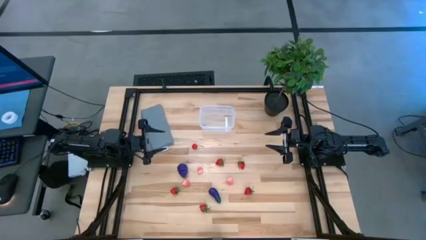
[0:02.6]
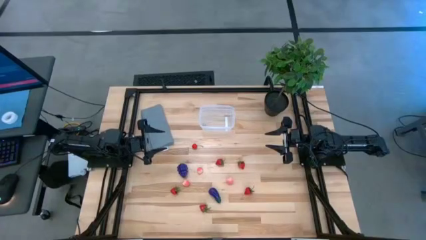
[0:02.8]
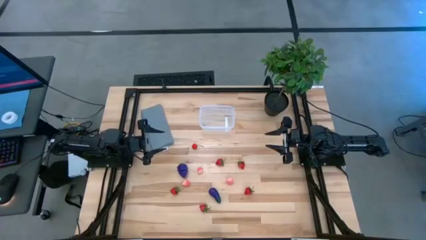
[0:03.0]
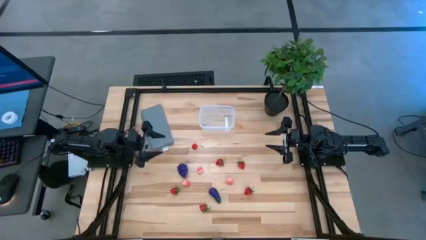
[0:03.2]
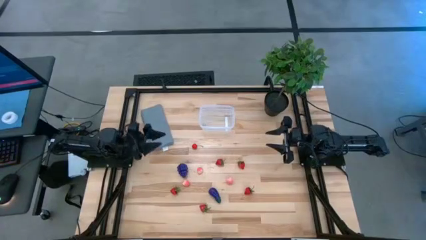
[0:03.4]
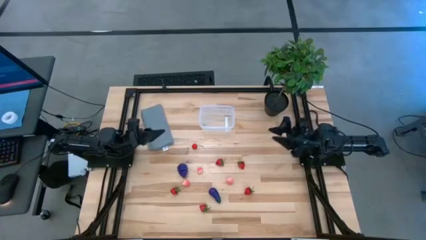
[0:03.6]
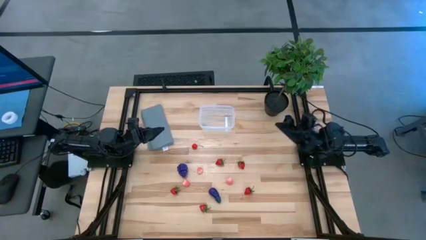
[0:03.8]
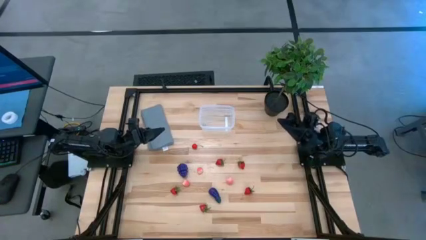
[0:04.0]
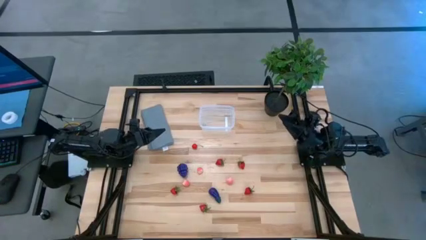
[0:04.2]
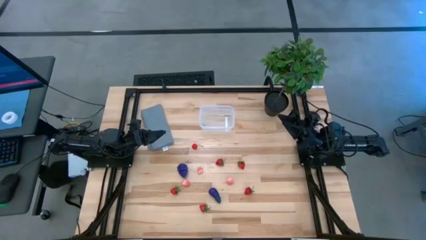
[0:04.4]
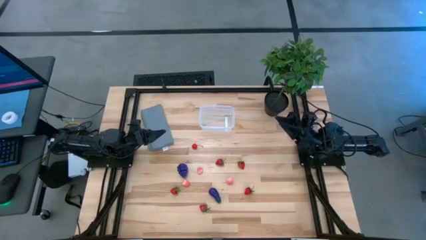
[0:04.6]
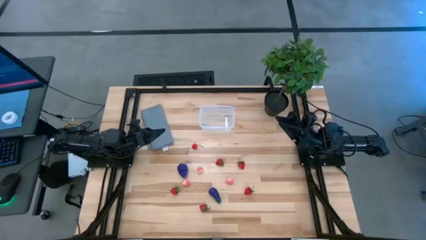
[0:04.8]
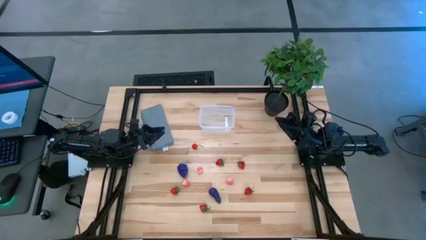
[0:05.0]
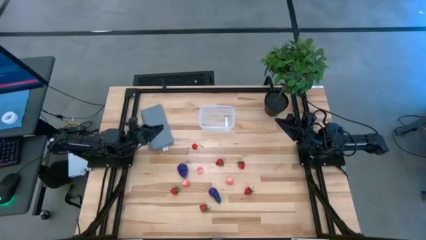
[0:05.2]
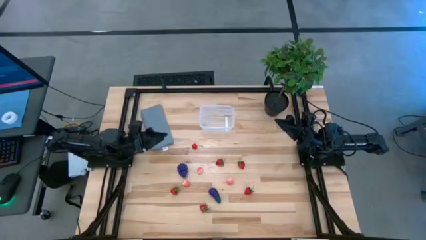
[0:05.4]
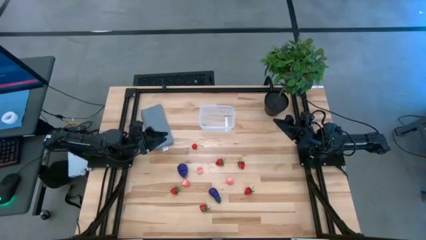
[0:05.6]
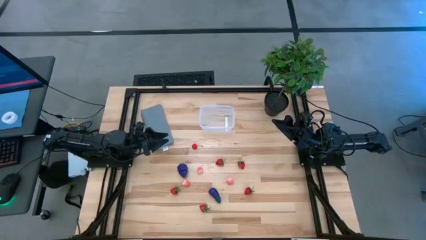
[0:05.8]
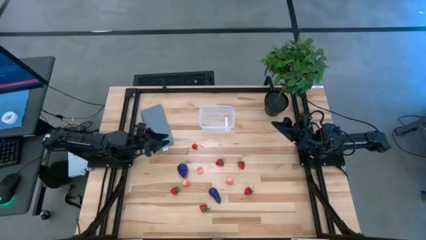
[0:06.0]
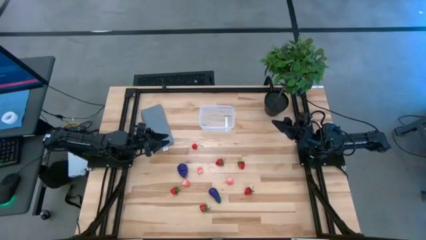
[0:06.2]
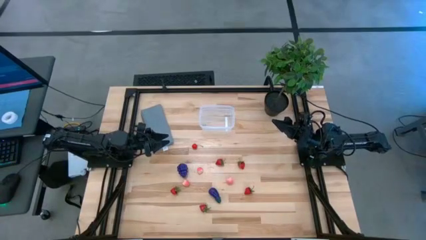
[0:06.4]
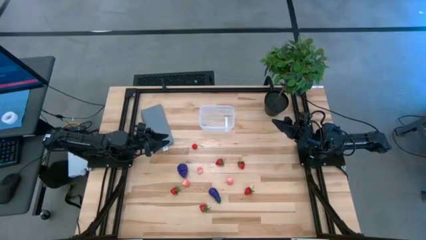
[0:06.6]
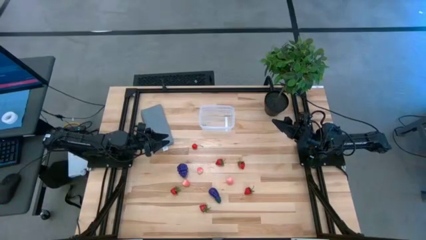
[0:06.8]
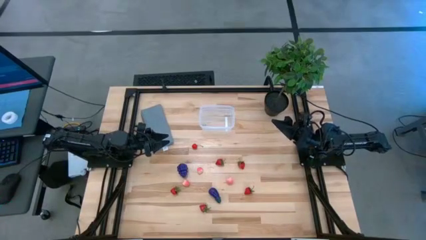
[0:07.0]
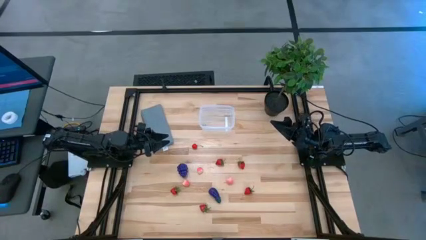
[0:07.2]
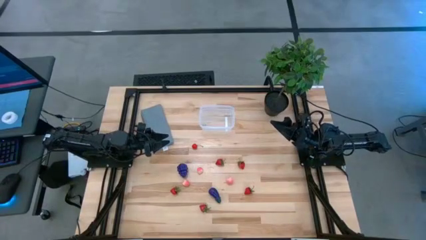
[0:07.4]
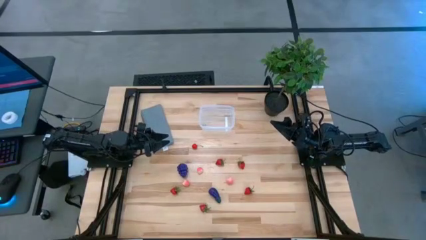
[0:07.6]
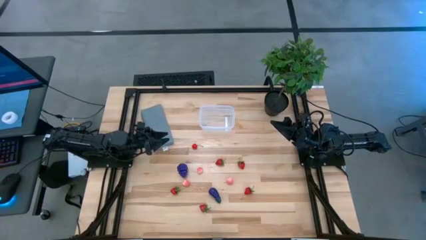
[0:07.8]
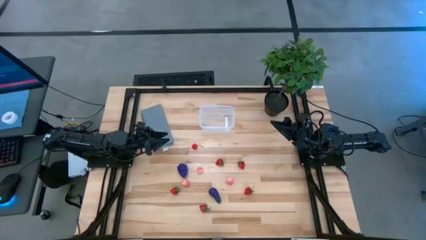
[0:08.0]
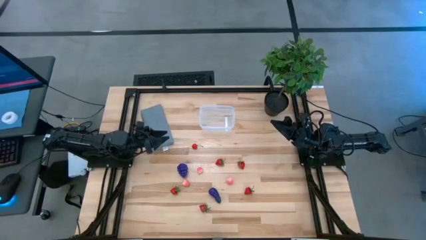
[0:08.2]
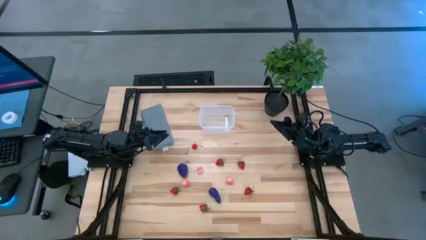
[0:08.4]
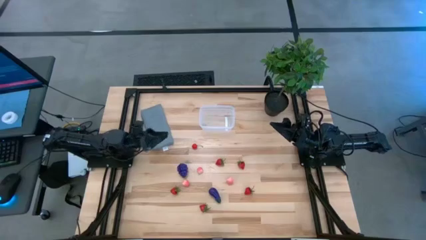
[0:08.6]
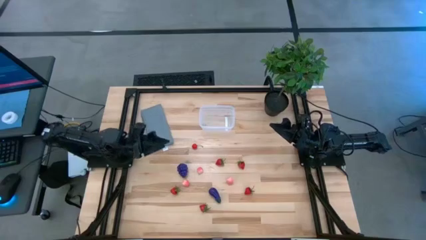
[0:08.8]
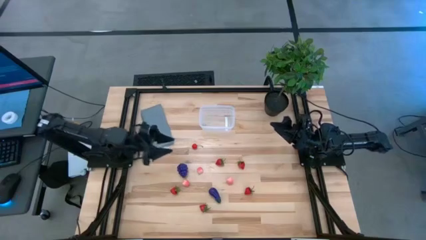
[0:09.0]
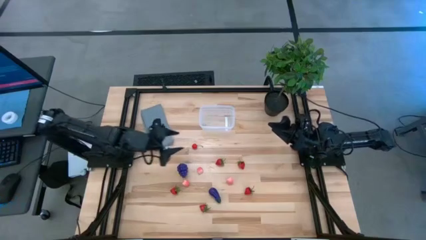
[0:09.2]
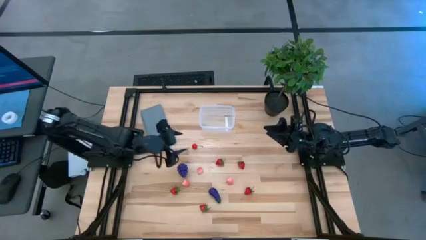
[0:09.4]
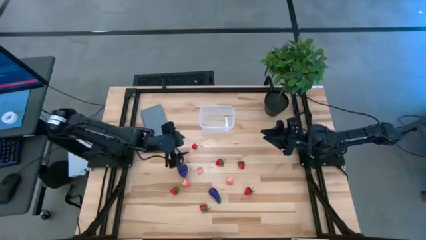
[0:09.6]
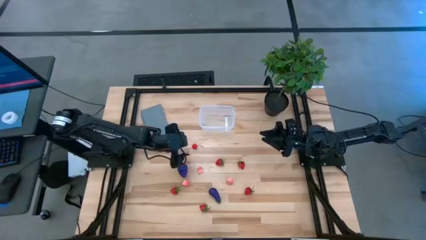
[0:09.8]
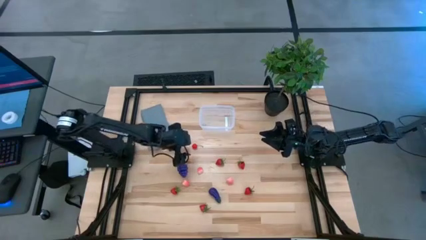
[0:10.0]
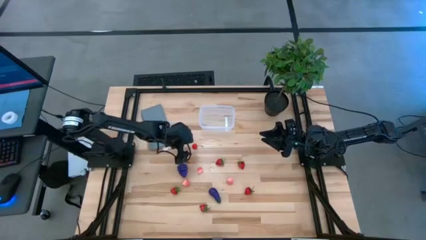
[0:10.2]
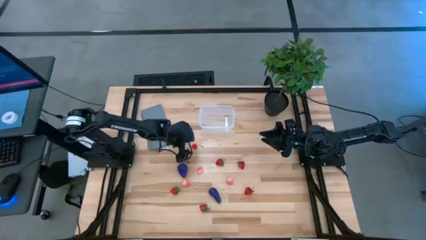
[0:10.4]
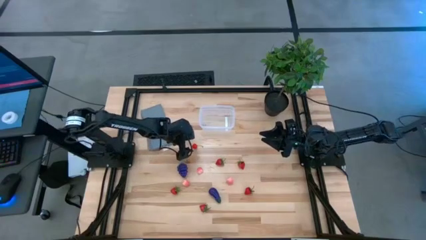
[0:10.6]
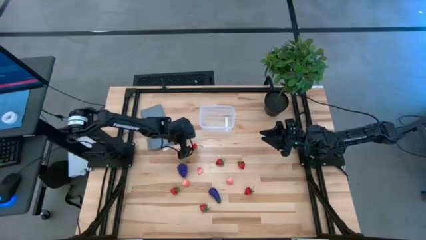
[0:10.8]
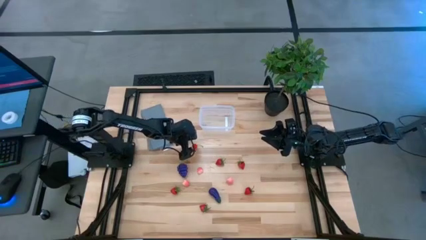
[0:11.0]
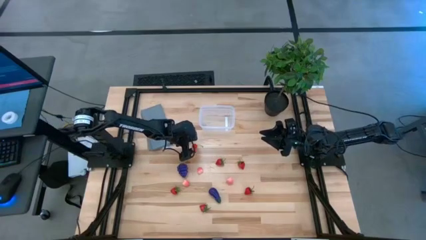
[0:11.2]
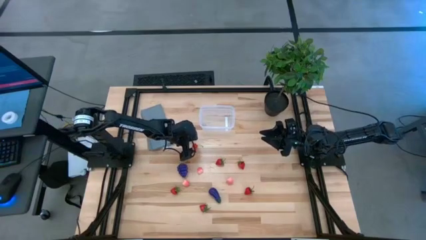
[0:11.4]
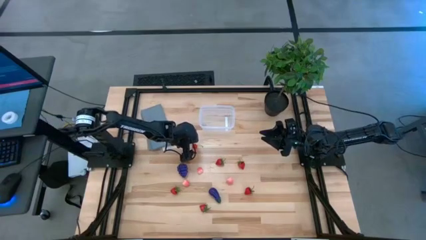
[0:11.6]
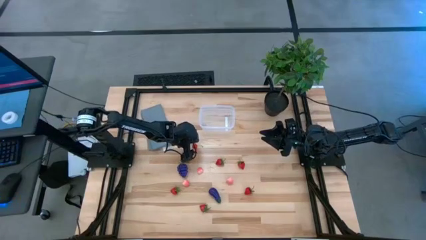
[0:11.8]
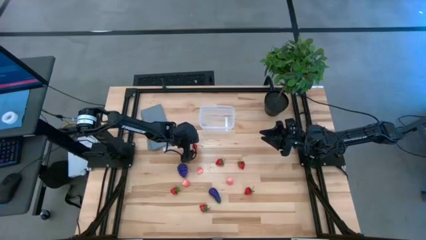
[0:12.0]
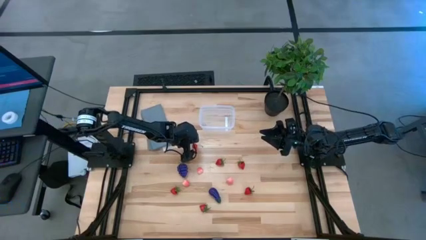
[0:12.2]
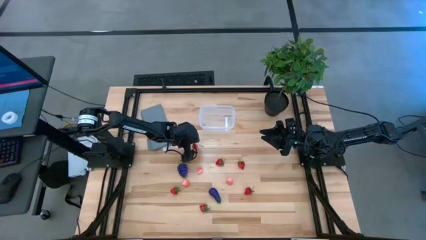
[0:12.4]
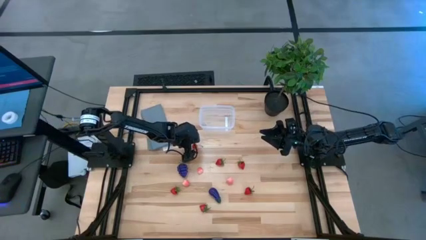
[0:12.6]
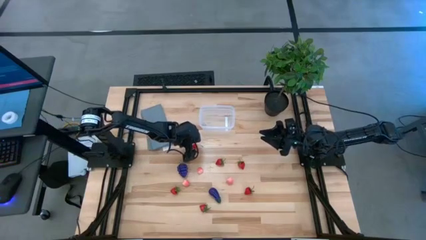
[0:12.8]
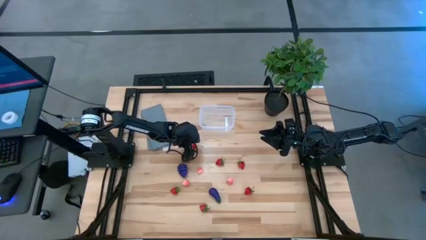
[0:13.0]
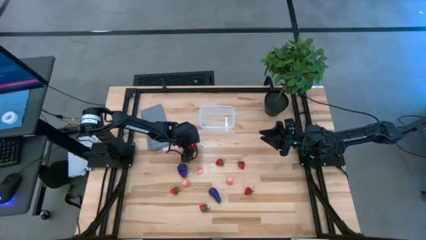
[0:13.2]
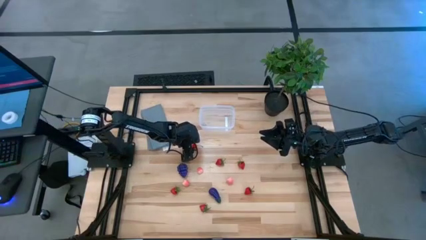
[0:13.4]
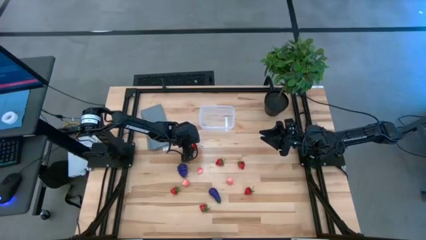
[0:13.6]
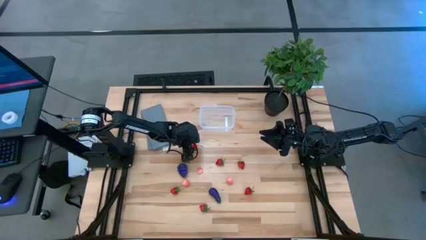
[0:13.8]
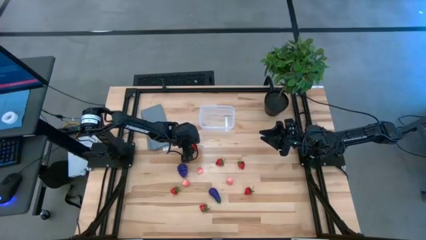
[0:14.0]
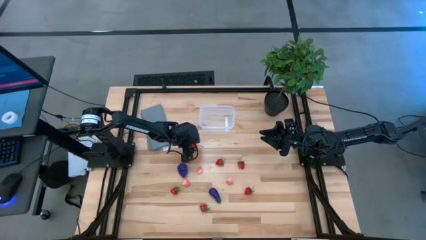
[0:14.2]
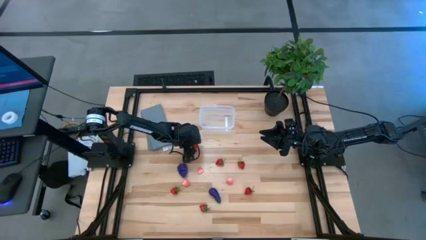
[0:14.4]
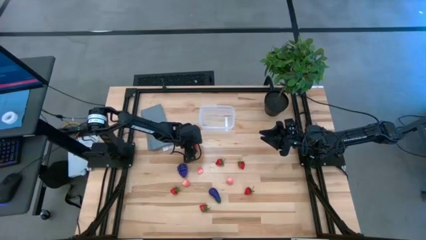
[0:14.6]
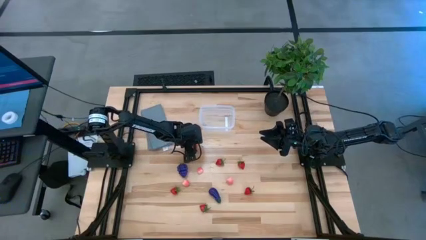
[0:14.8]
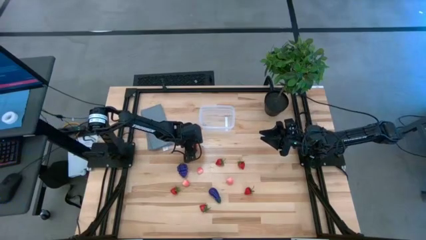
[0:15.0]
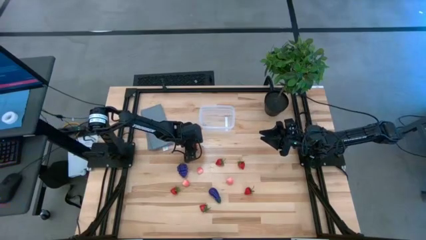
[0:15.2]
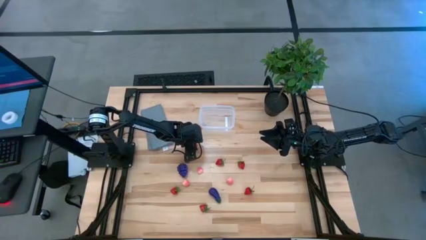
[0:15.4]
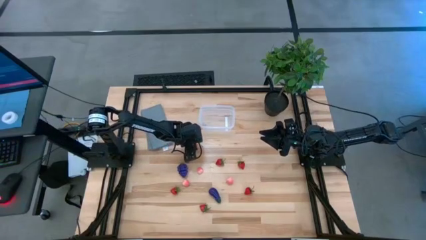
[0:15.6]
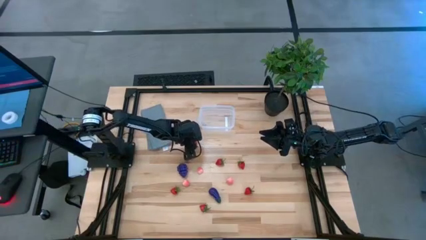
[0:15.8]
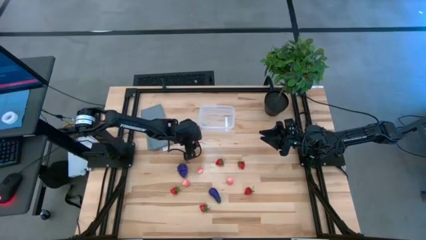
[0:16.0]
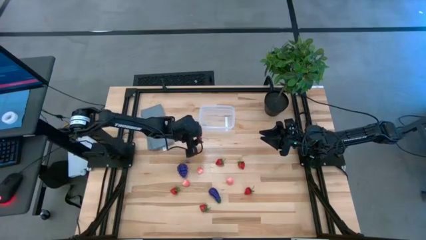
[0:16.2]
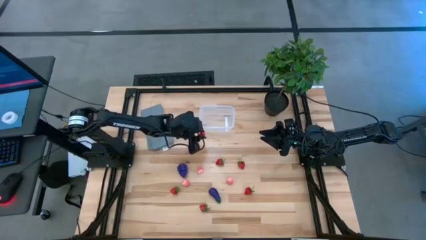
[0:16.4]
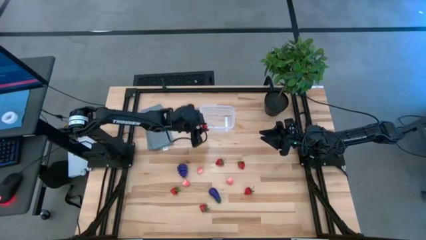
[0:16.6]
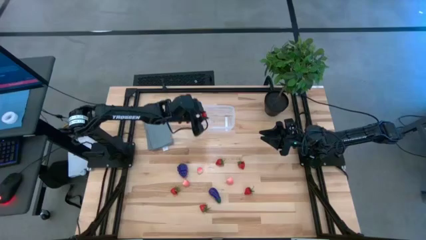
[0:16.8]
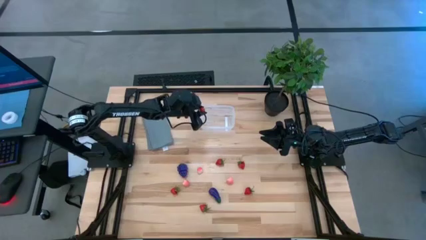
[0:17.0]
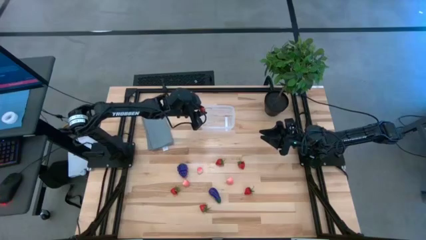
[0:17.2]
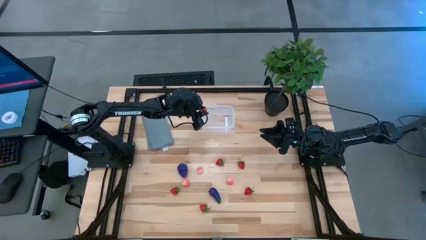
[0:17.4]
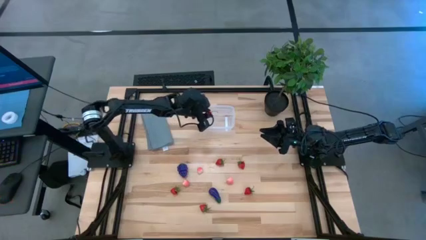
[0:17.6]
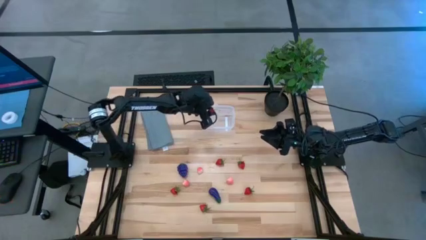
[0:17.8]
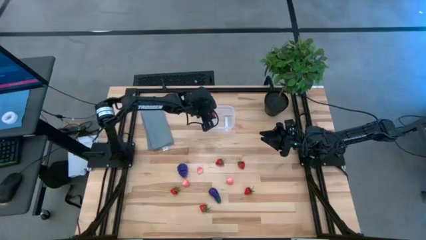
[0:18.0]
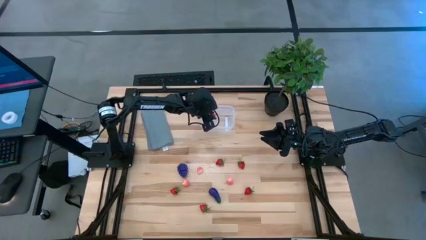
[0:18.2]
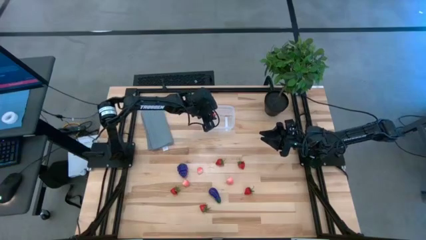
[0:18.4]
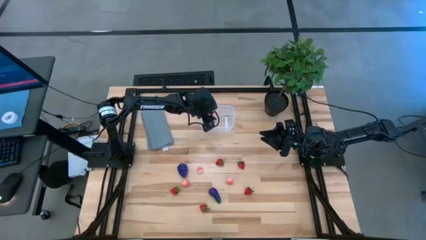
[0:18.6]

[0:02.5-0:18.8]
Task: Pick and placing Produce into tupperware
Put the cherry into the transparent bin
